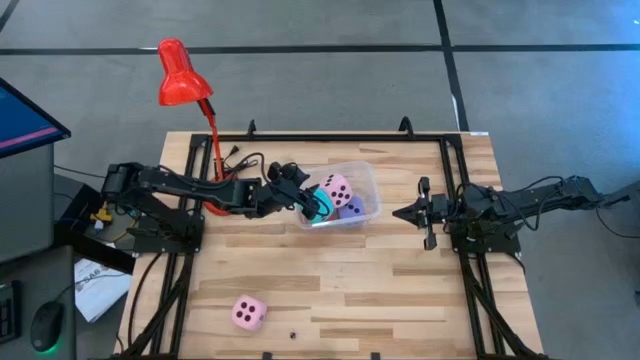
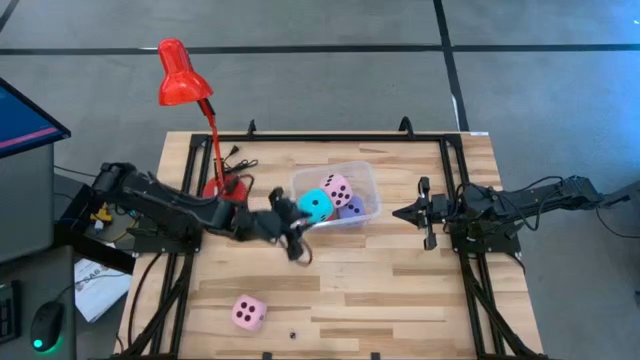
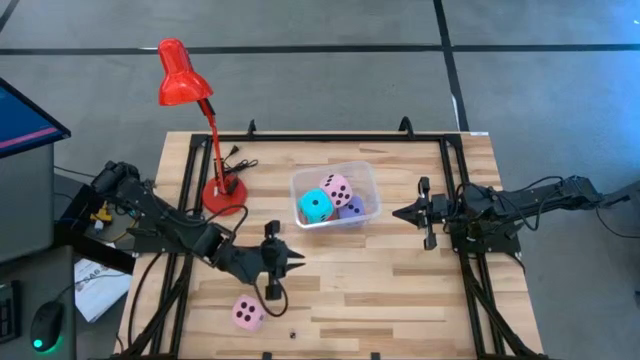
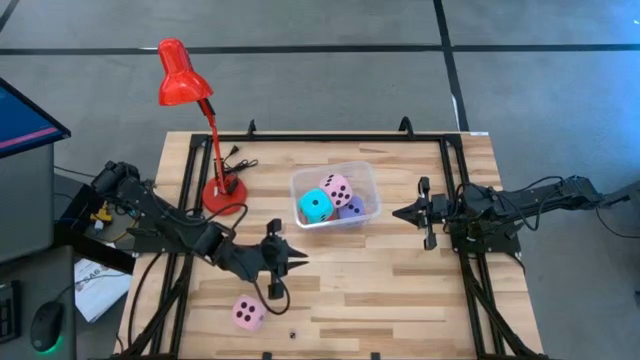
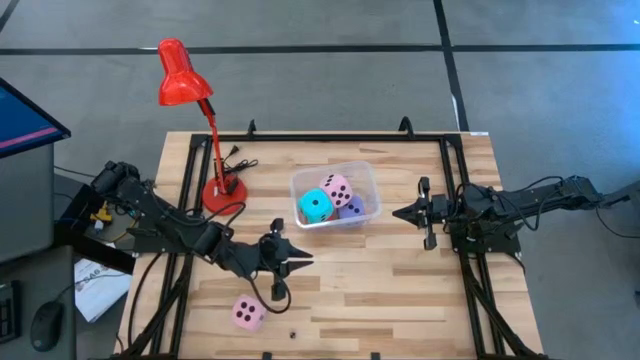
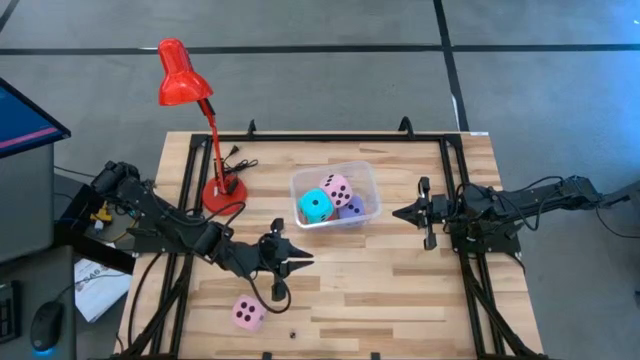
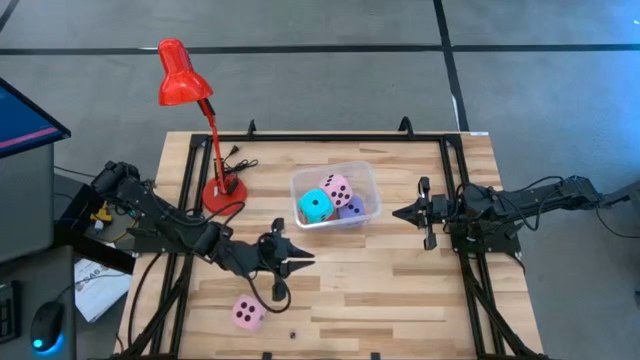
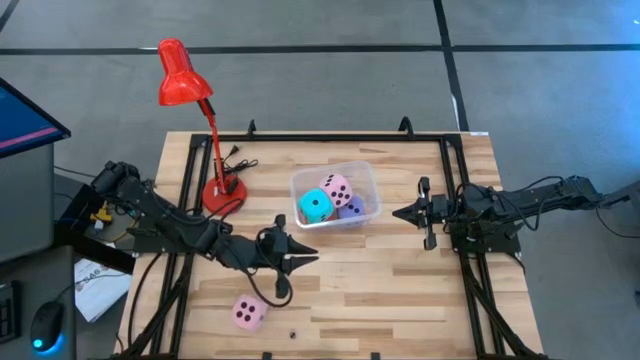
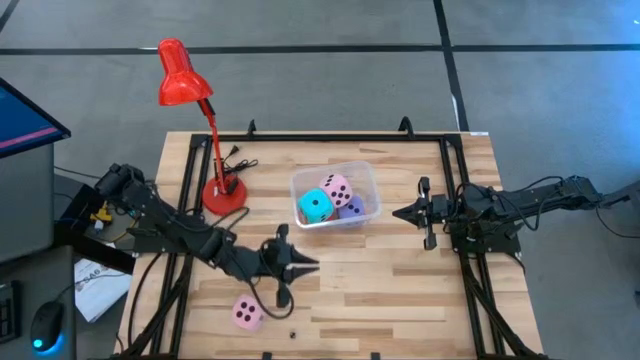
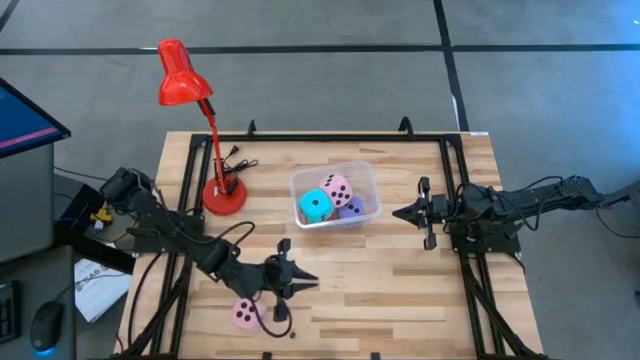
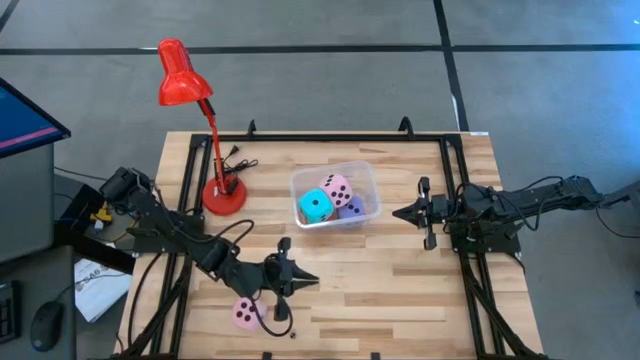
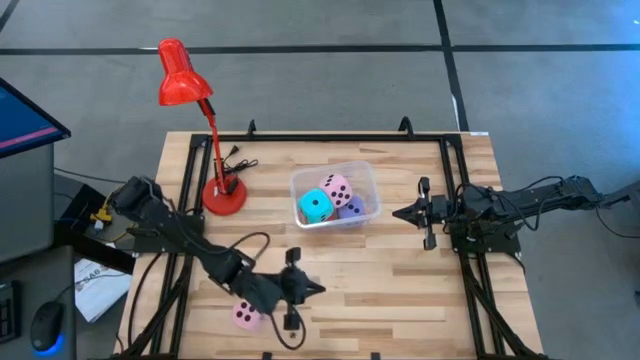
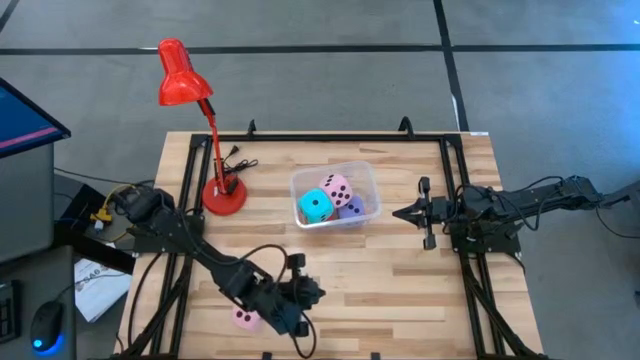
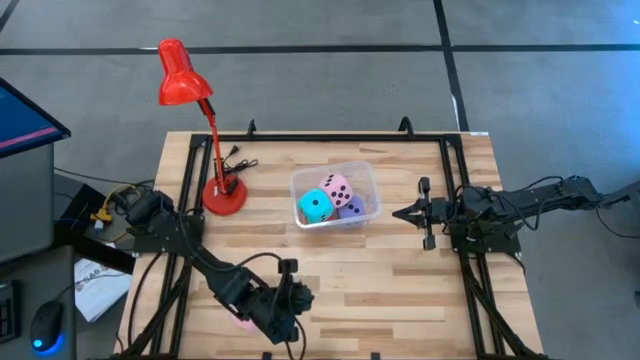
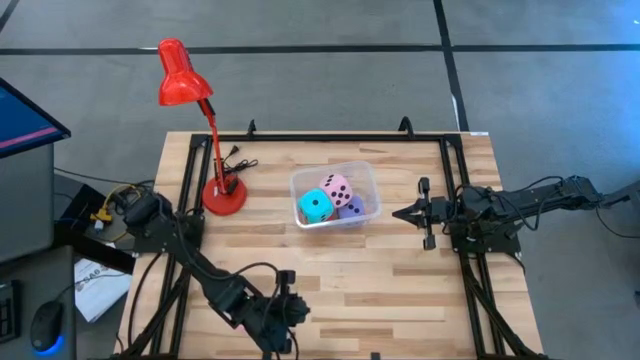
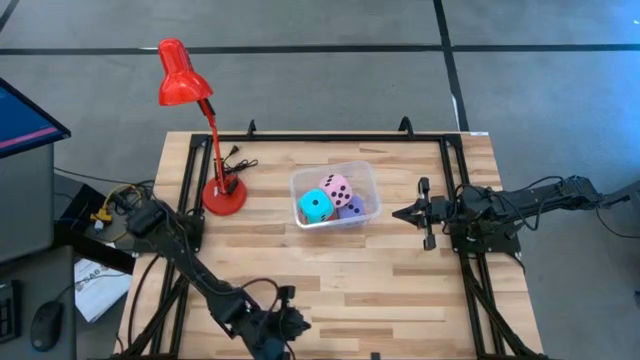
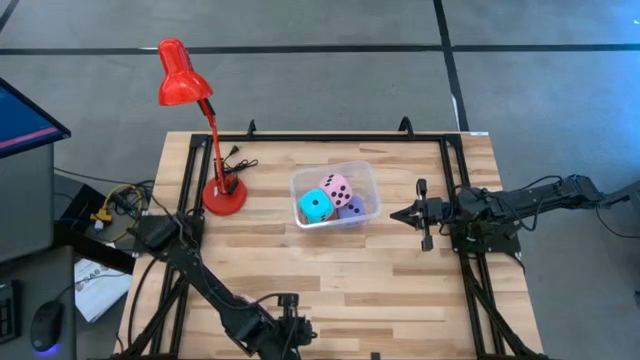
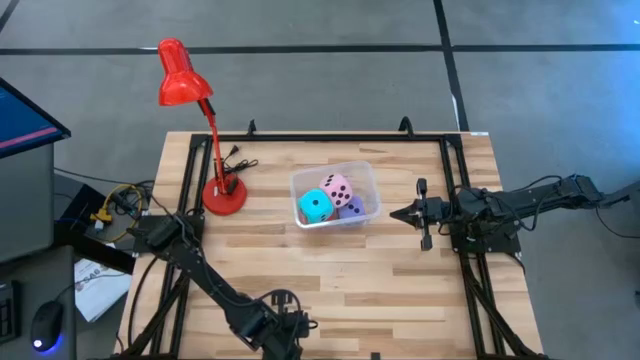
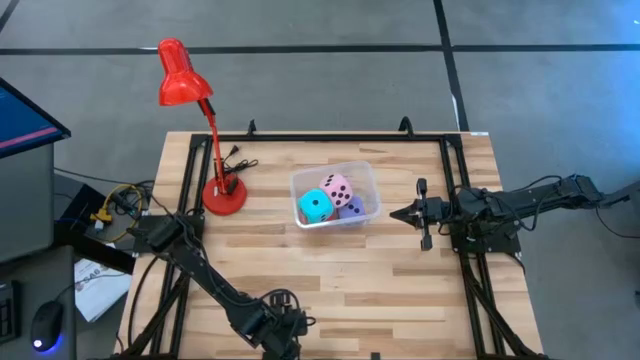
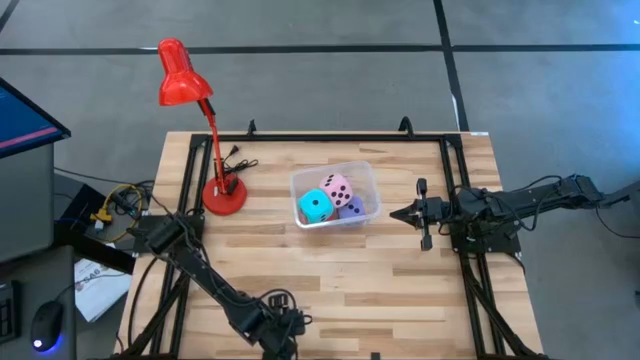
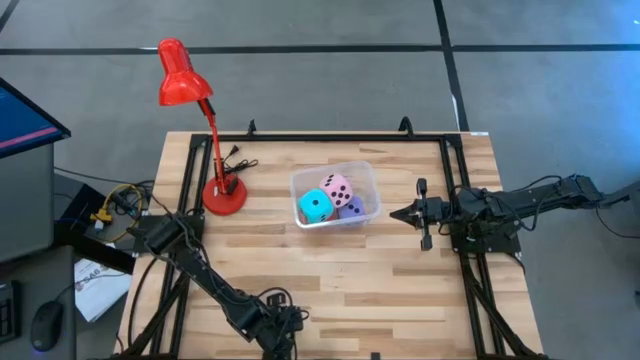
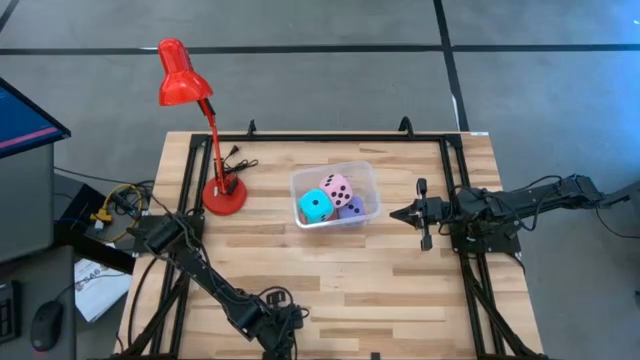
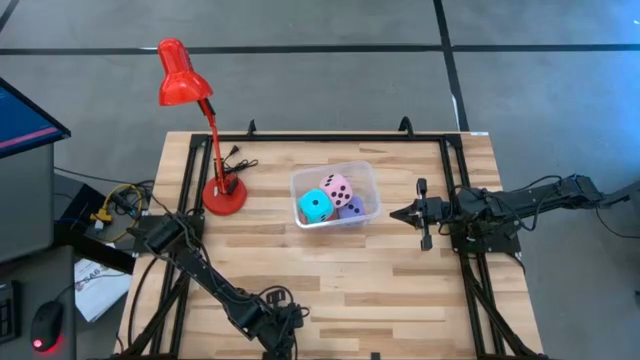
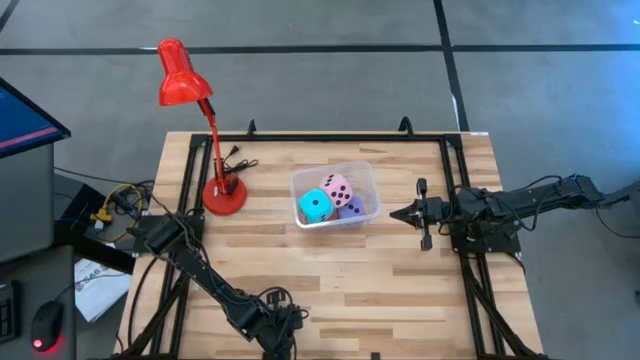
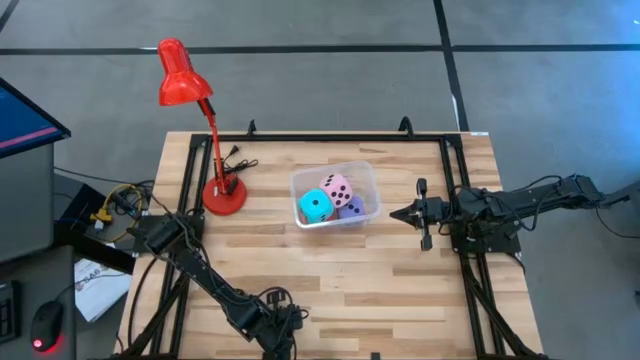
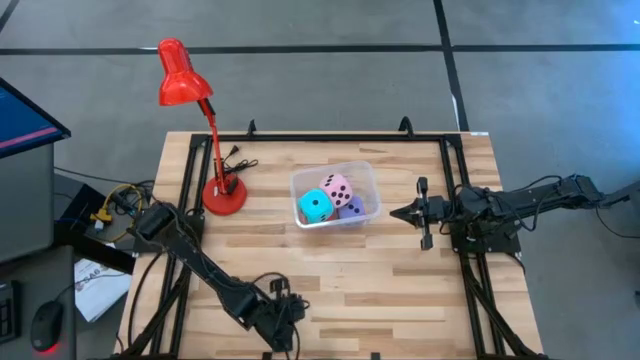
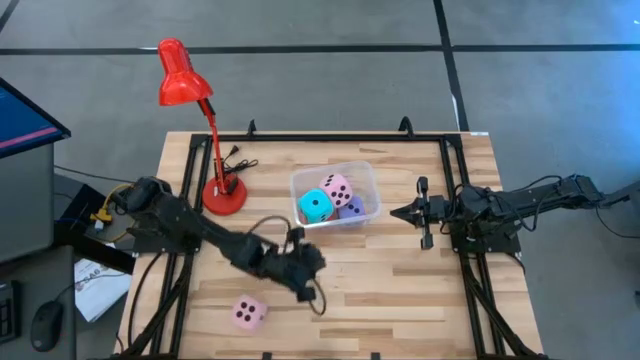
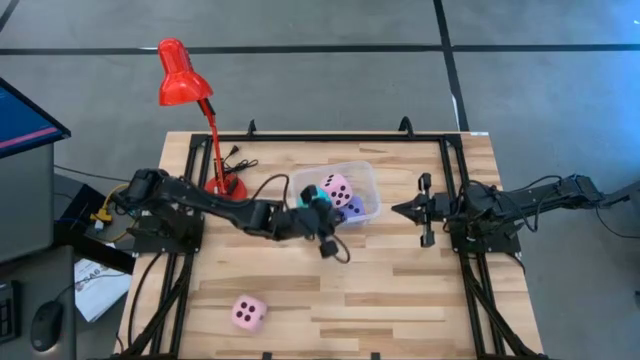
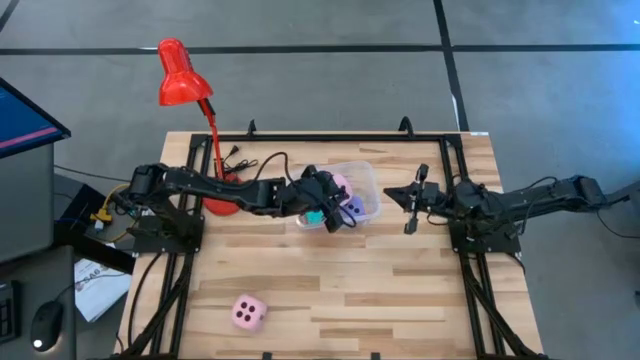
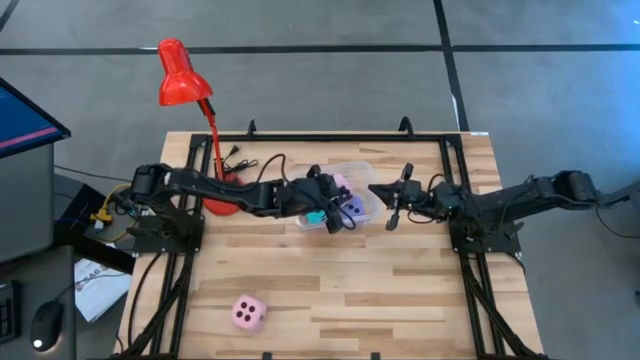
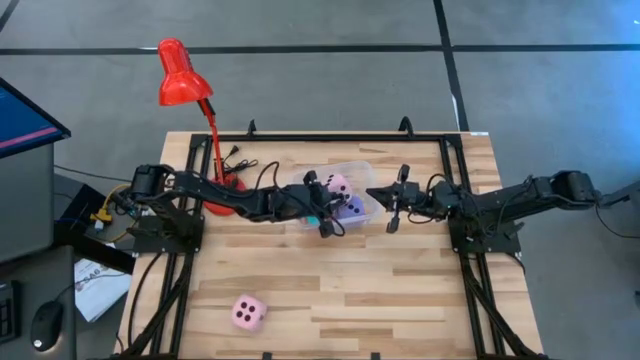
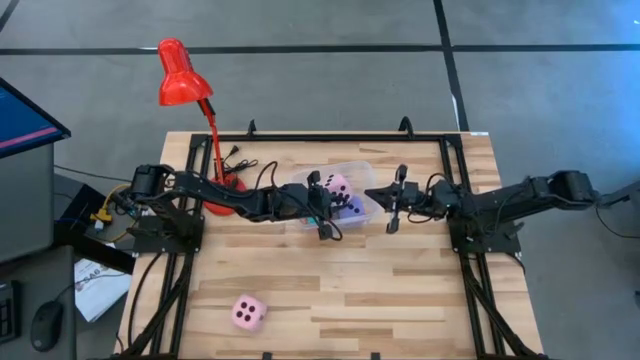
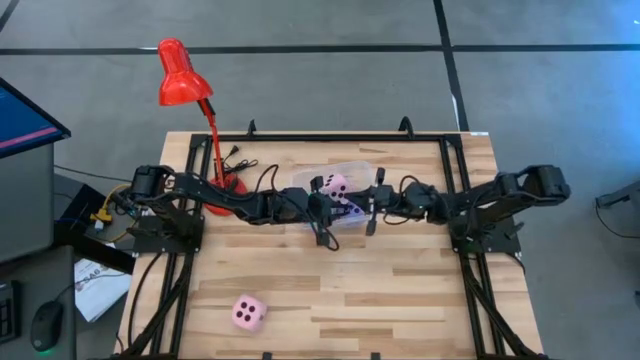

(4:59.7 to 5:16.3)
Task: Pick & Place Dice
Put the small black die into the transparent bin

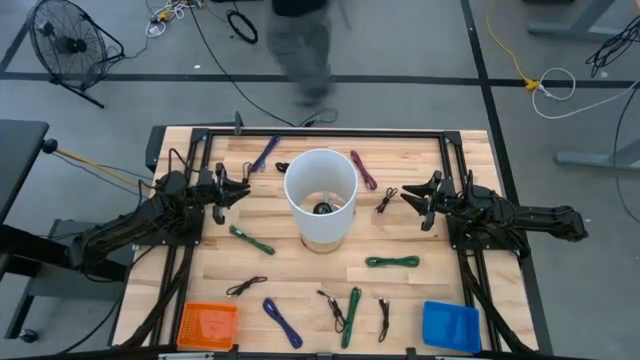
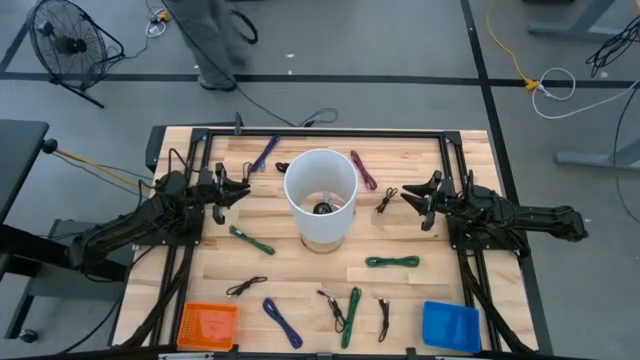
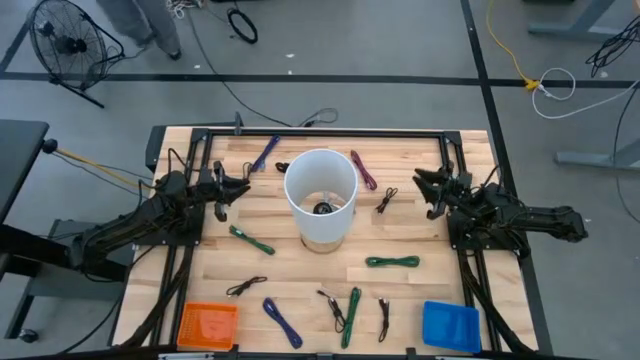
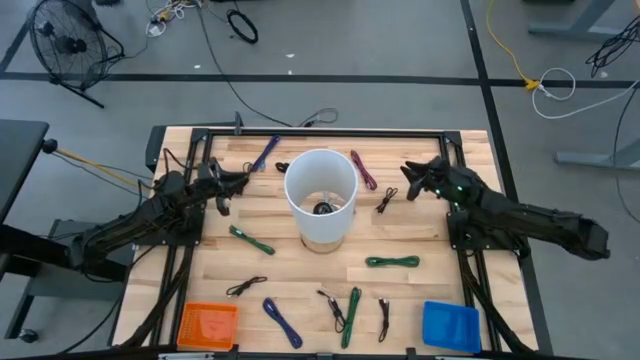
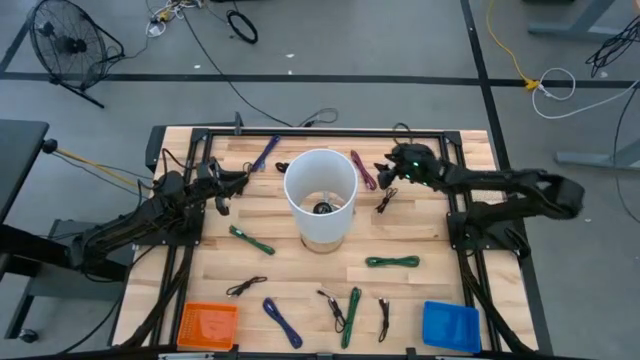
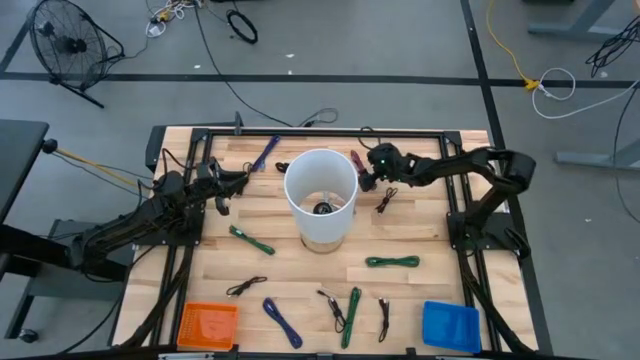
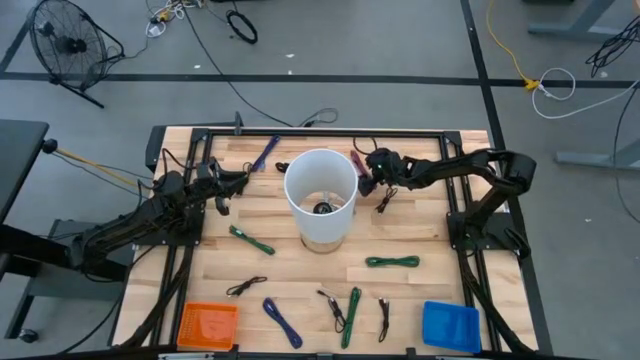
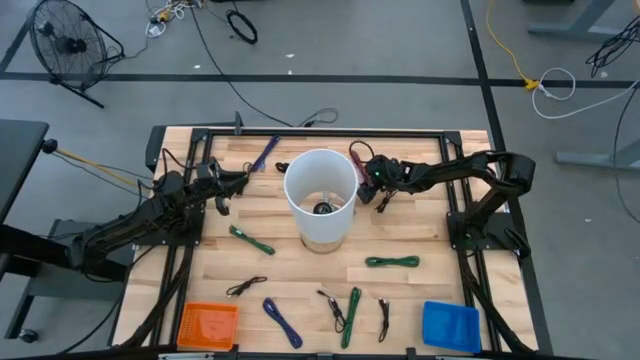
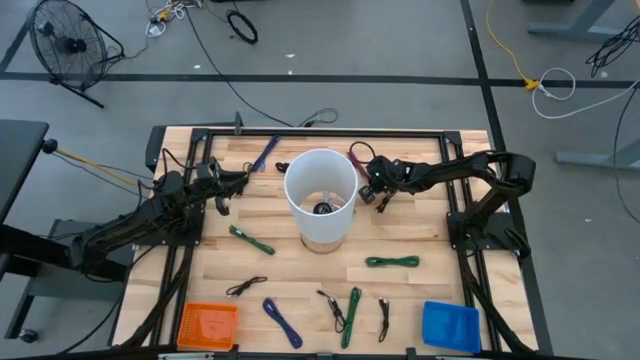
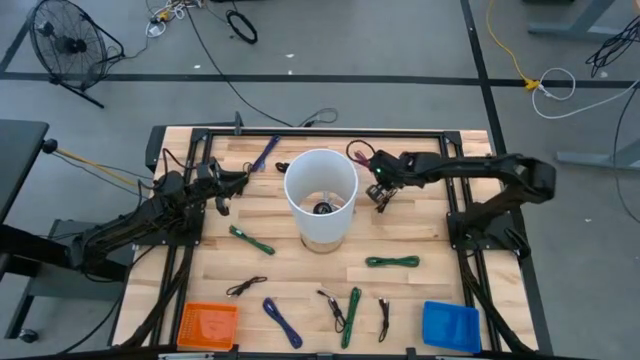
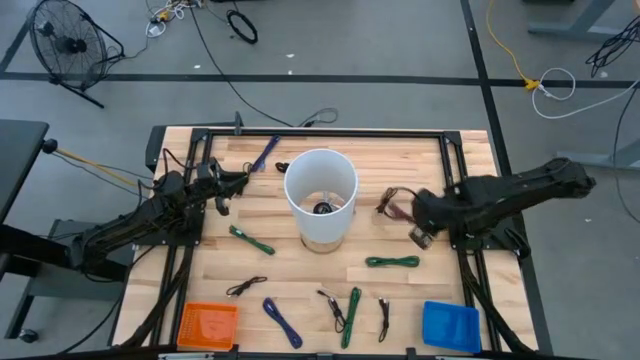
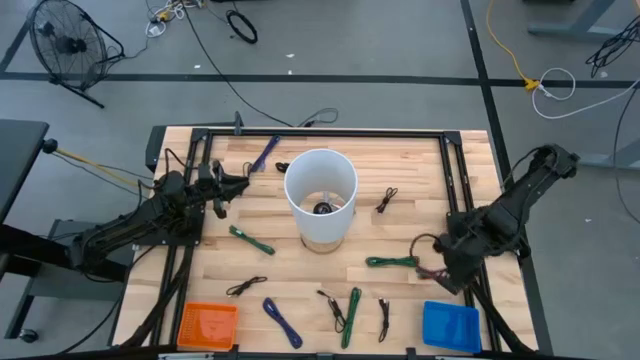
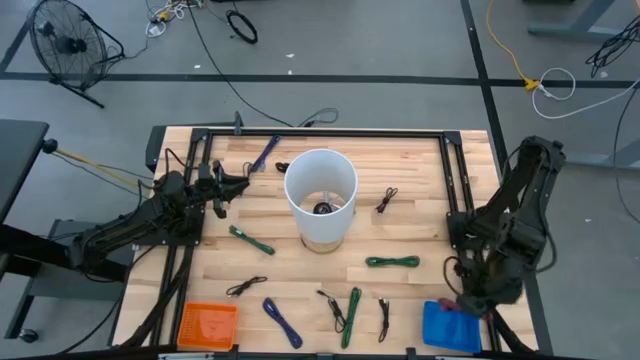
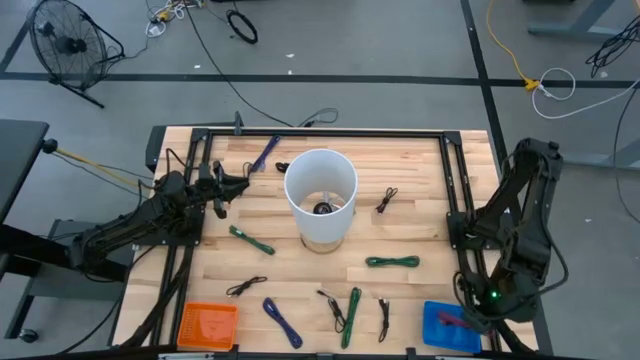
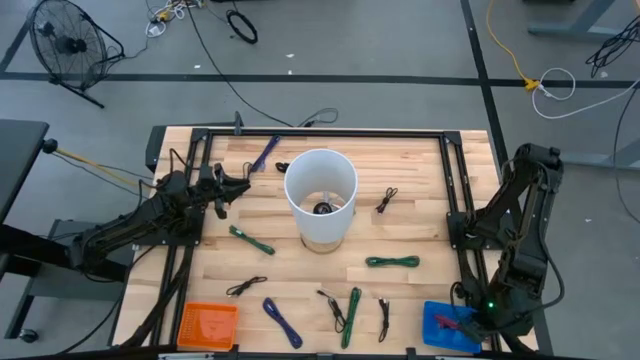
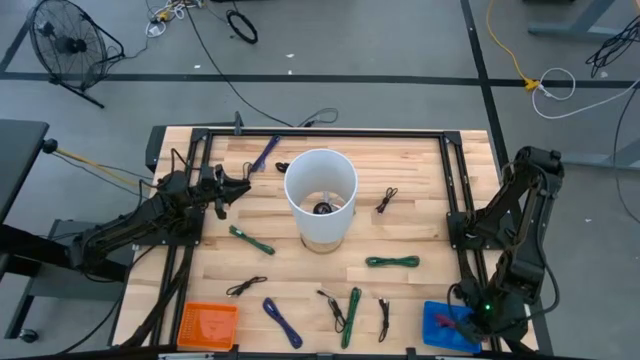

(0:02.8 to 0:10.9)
Task: Pick & Place USB Port
Put the black and pink charger cable into the blue bin
